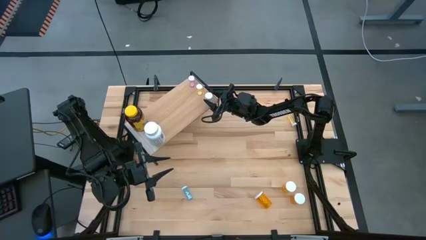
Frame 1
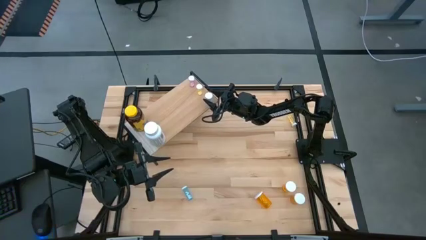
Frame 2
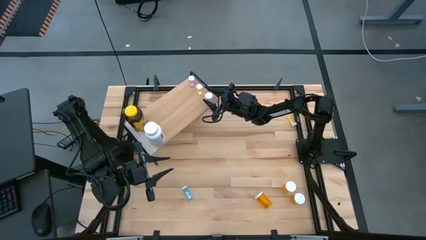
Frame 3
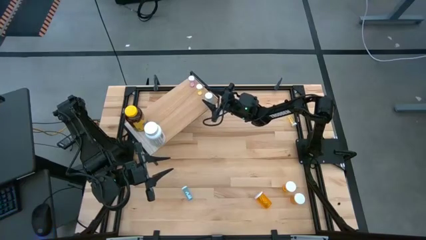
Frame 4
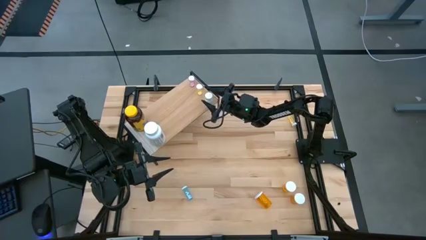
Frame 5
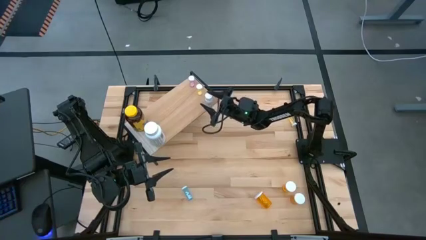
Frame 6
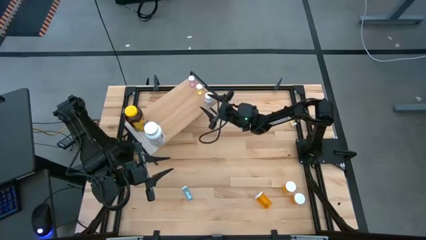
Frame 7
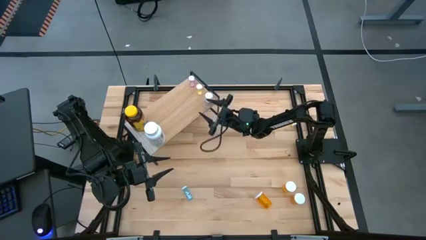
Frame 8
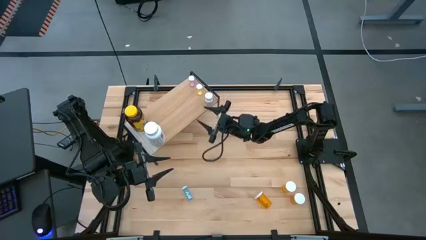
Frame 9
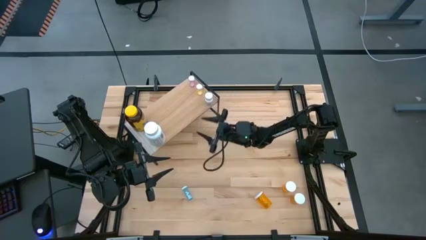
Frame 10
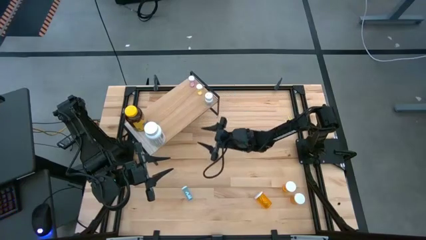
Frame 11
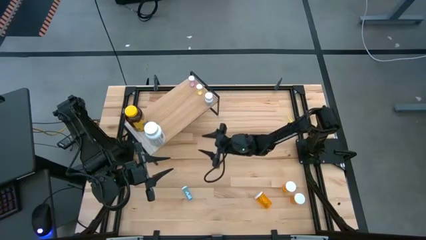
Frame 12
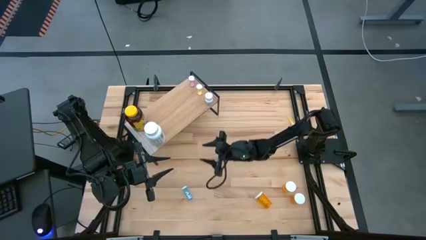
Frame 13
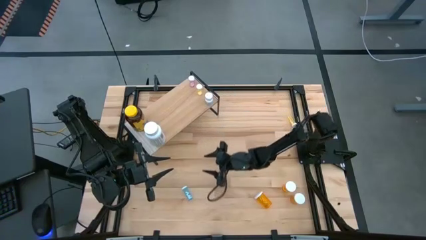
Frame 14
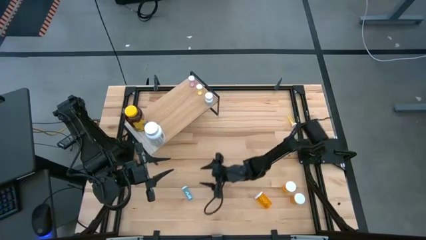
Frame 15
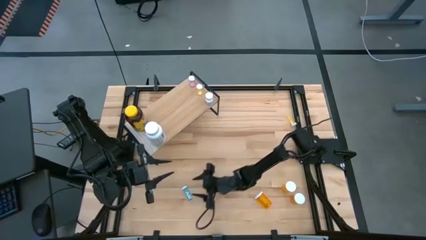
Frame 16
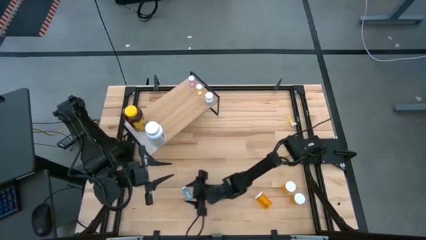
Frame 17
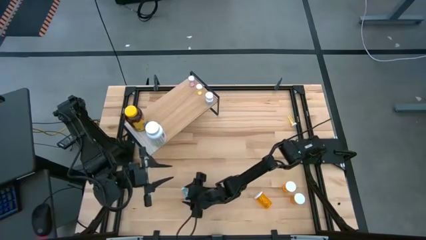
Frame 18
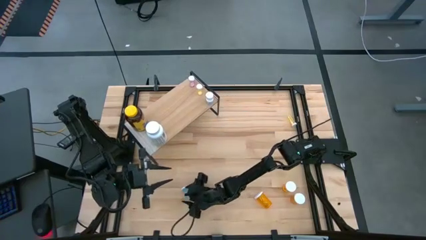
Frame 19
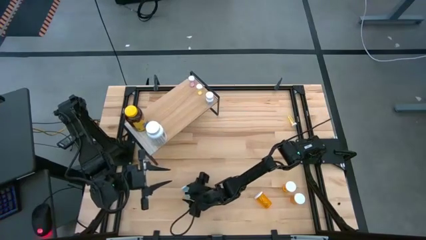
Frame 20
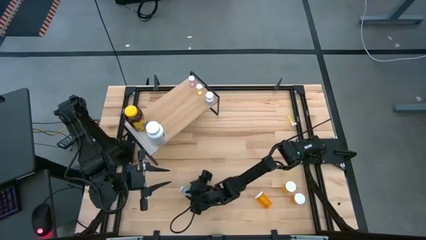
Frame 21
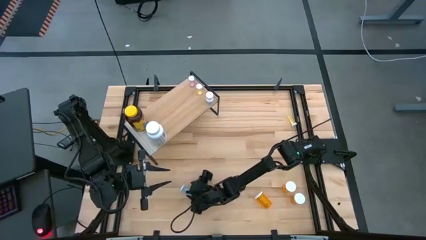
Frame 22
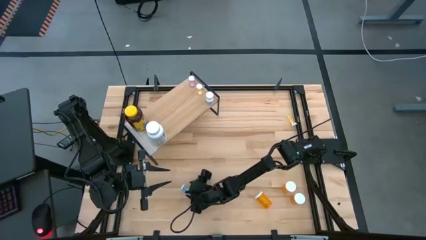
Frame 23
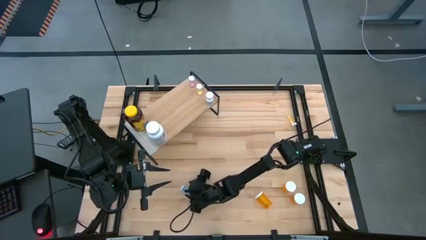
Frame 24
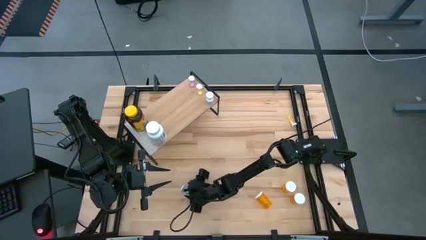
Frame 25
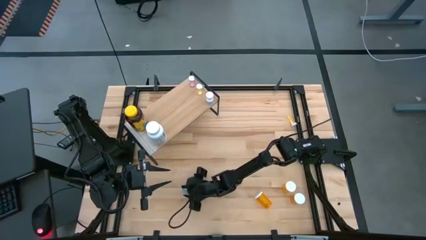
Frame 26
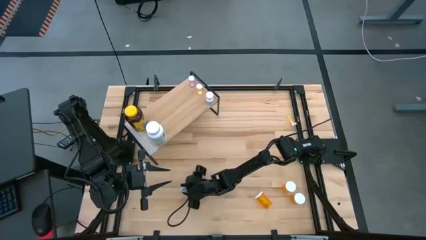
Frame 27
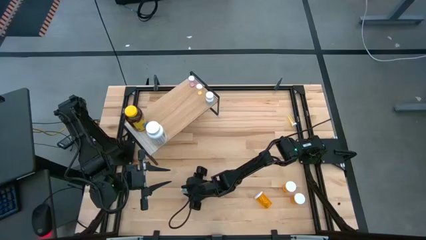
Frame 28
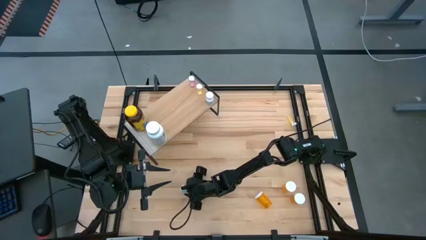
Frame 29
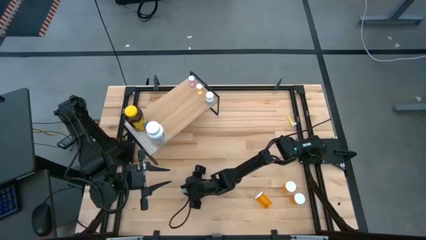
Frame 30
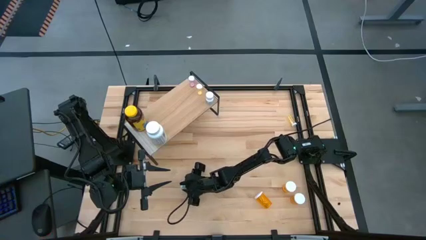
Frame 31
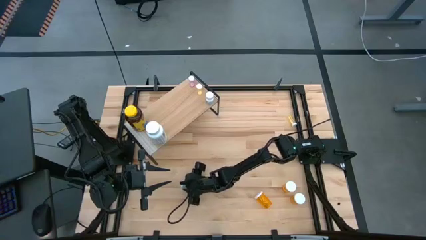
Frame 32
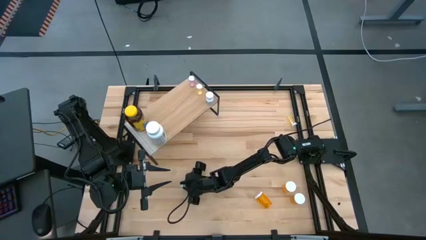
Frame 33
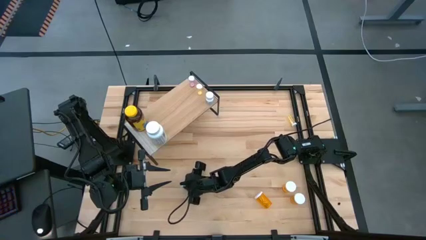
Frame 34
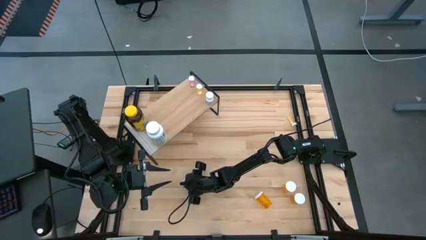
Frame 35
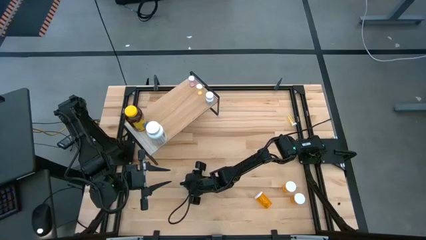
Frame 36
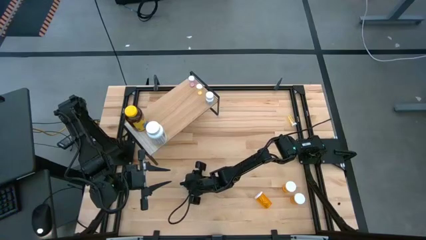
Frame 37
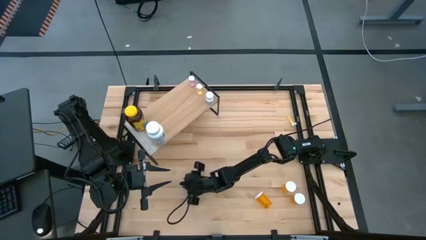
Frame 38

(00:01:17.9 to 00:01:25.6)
Task: Pick and place medicine bottles onto shelf by color
Put the blue pill bottle on the shelf

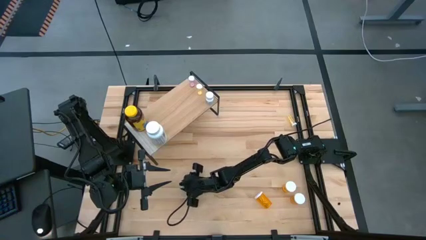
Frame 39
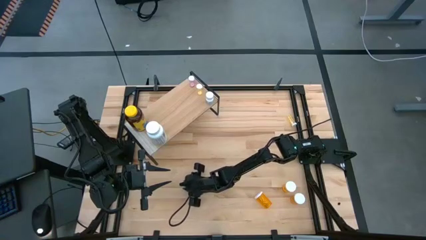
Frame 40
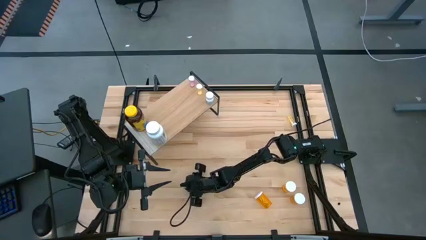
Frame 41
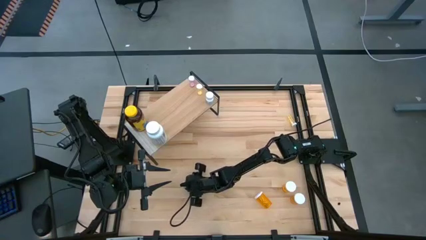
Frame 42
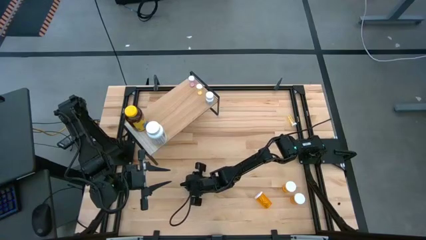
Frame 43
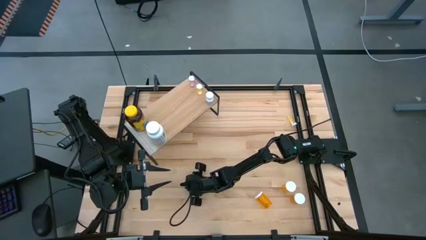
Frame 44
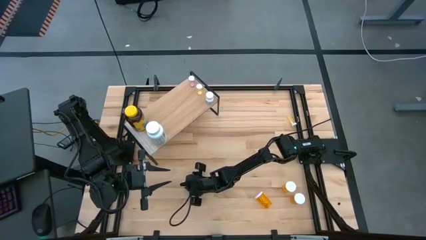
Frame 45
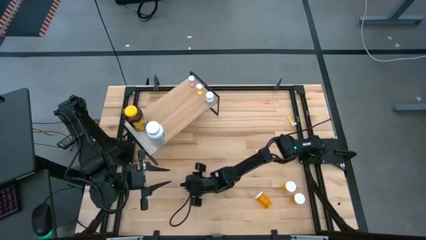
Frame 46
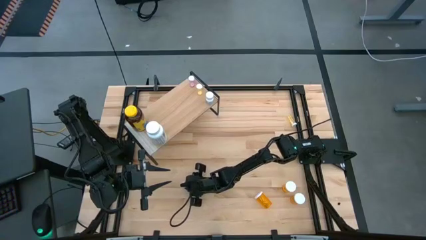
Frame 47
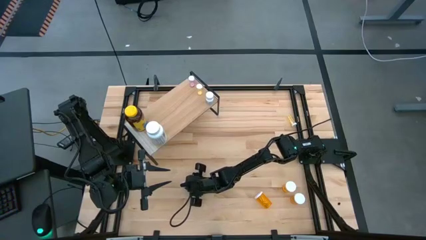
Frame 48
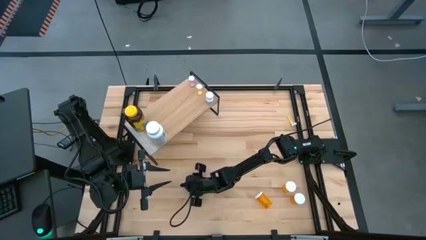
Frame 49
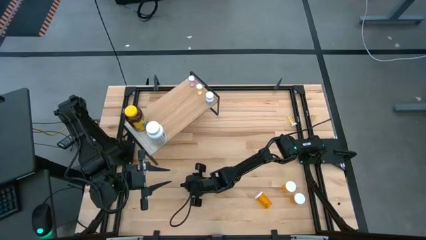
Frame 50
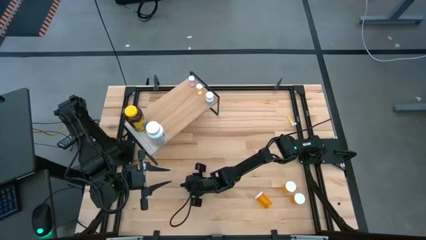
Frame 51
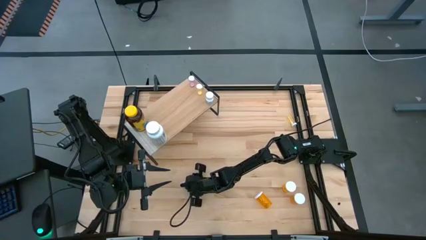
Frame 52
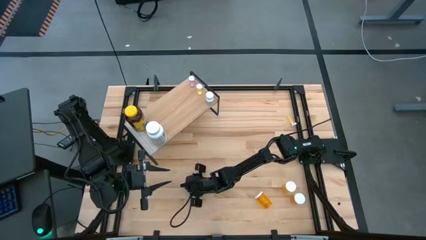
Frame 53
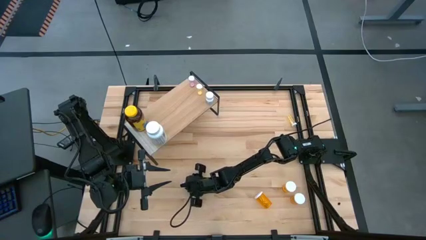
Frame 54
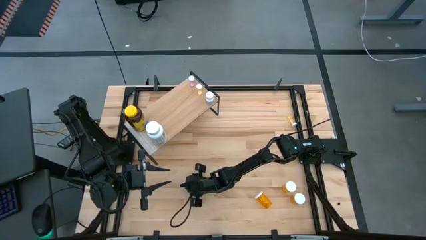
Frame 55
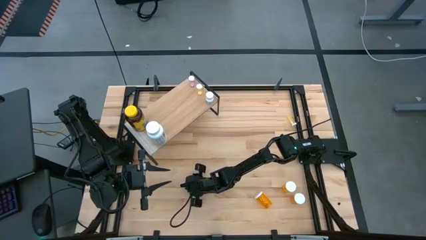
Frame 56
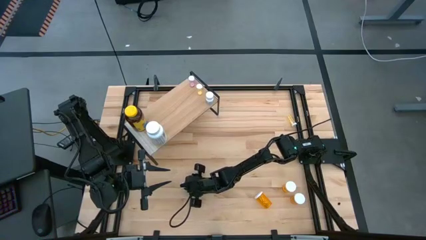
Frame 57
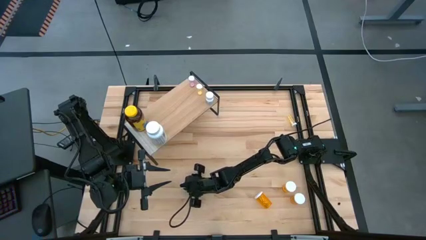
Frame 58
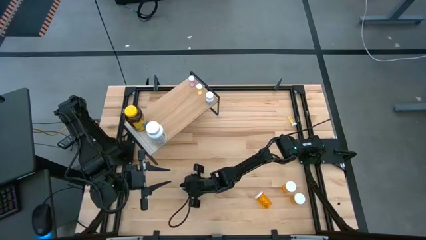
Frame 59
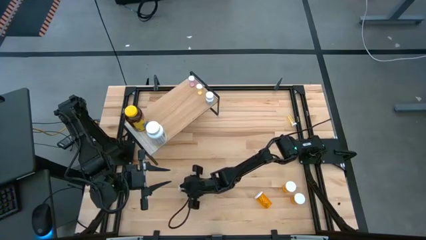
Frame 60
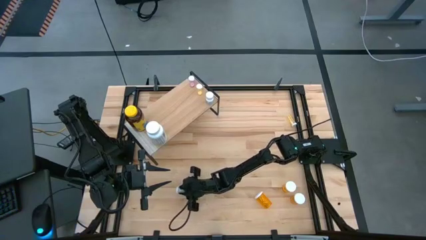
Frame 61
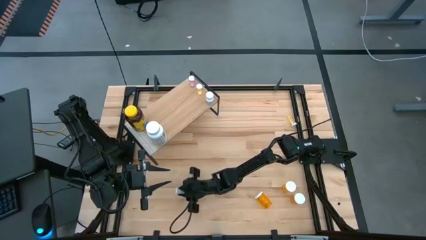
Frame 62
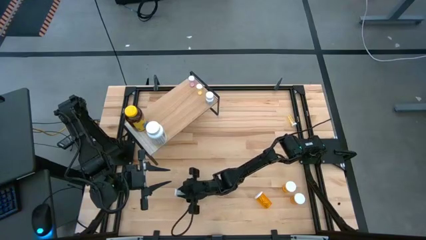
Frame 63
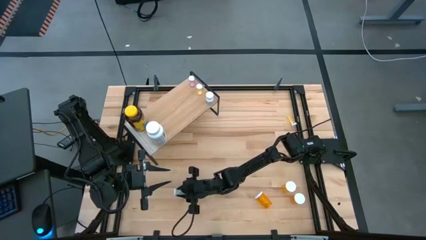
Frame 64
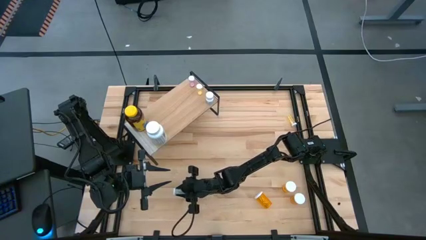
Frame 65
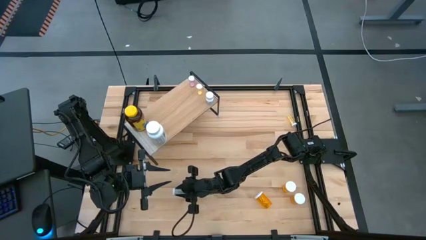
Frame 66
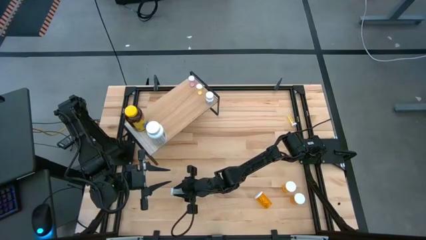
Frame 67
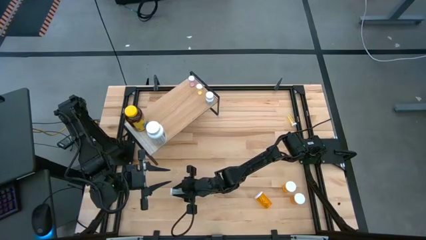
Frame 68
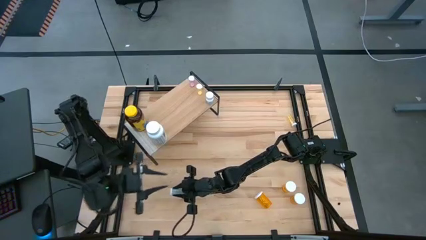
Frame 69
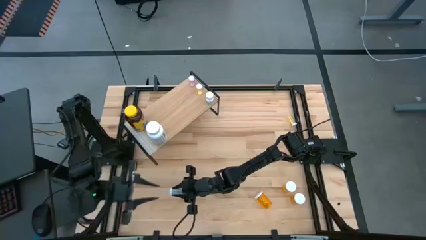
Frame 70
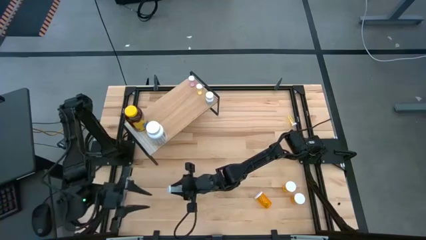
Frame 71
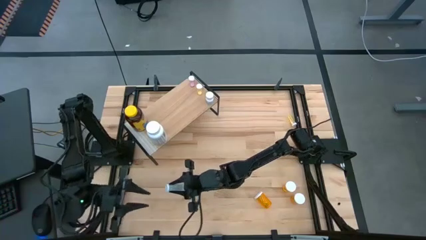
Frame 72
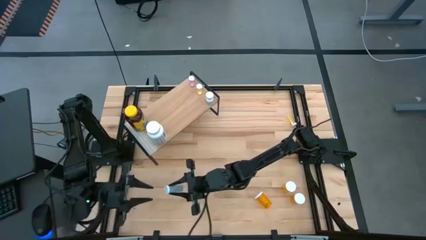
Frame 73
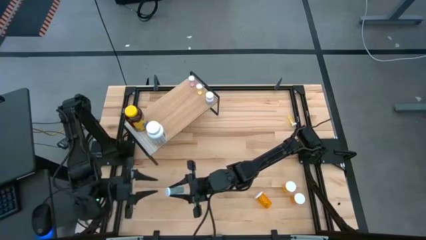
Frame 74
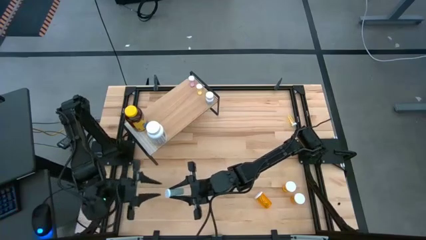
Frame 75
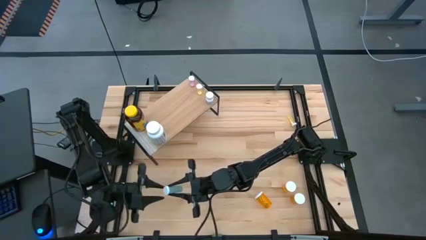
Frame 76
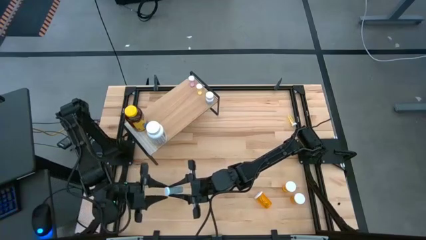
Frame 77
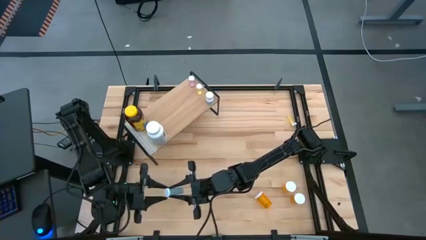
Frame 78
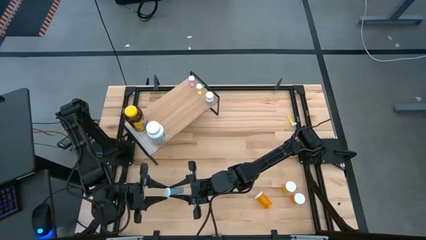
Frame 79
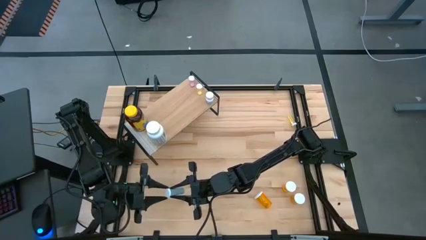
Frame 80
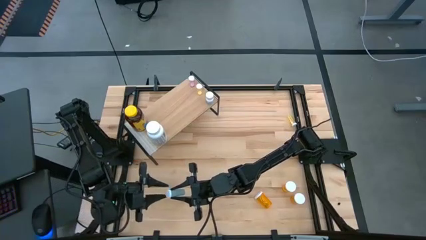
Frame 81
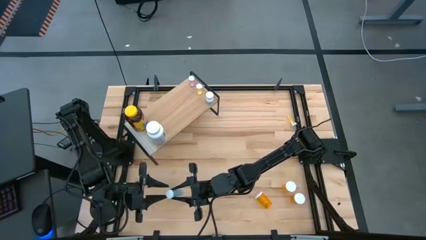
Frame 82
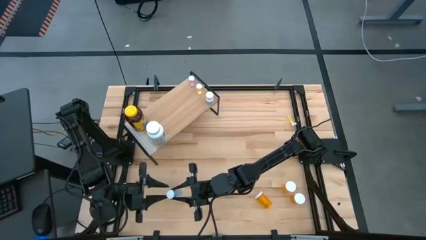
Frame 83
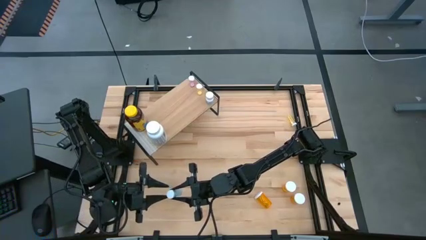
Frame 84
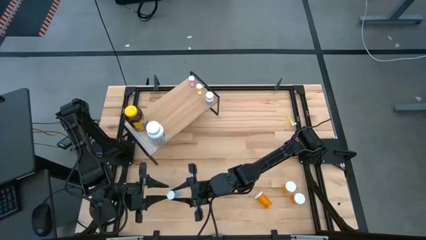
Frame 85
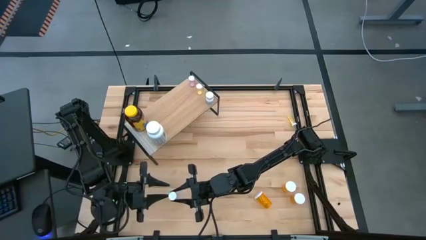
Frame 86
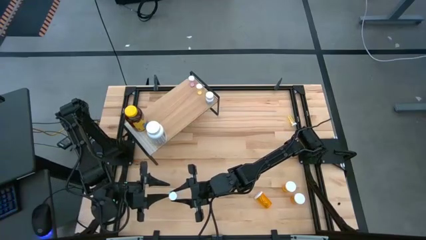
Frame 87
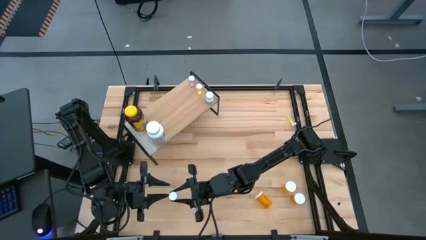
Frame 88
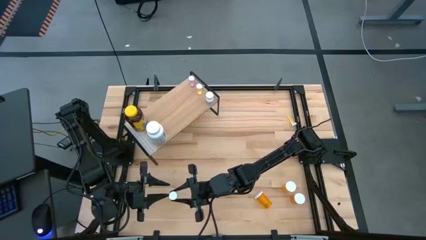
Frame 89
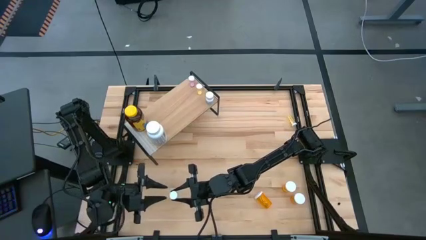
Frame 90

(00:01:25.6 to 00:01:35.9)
Put the blue pill bottle on the shelf
